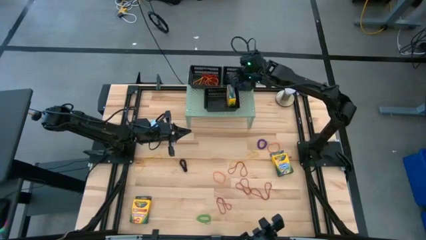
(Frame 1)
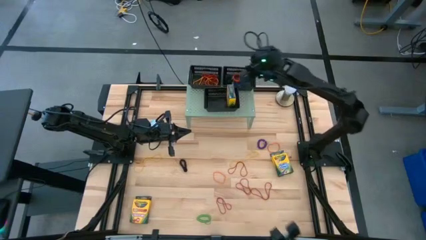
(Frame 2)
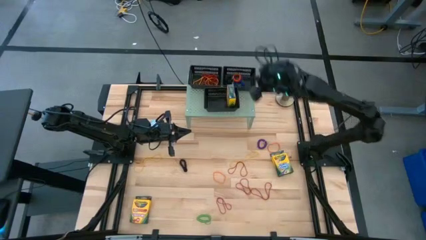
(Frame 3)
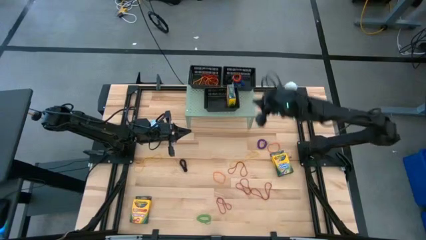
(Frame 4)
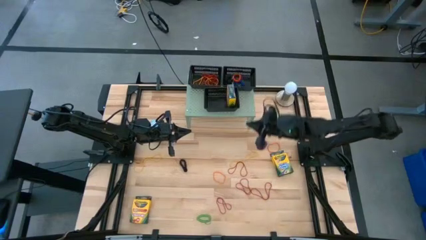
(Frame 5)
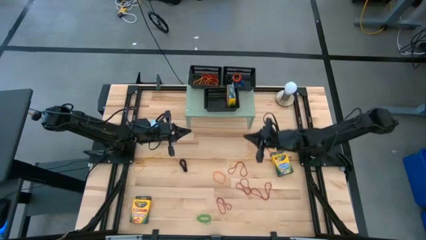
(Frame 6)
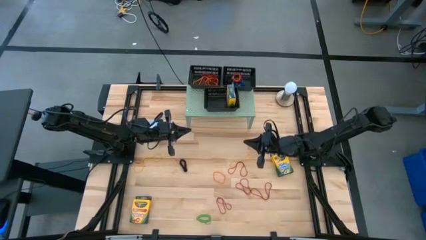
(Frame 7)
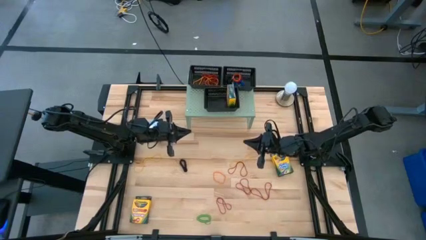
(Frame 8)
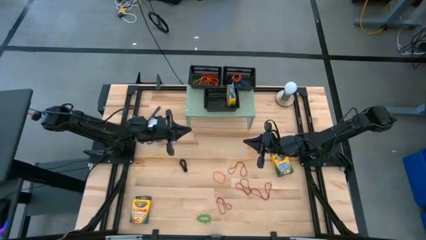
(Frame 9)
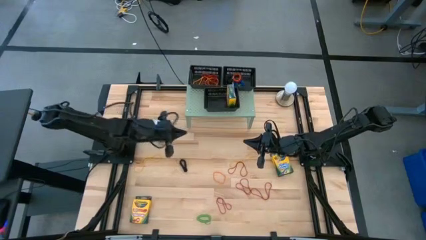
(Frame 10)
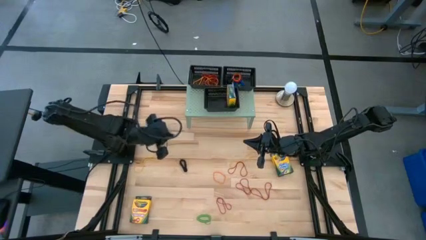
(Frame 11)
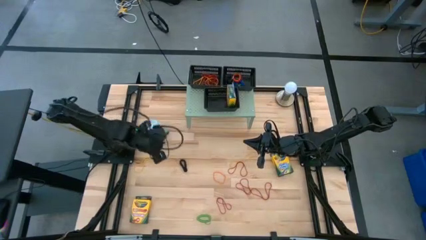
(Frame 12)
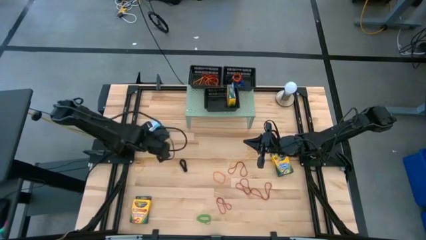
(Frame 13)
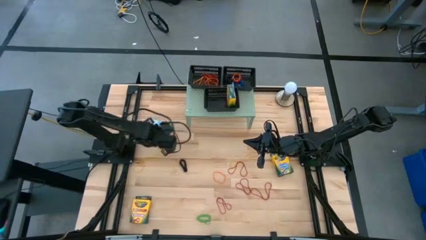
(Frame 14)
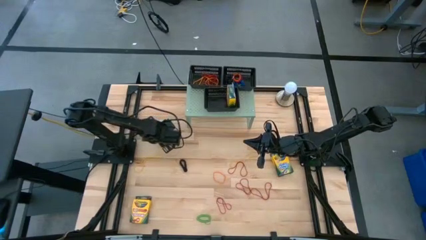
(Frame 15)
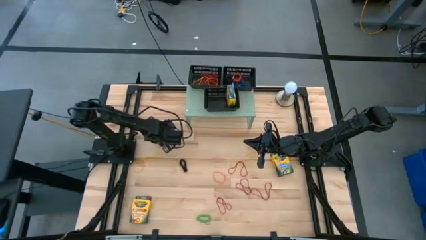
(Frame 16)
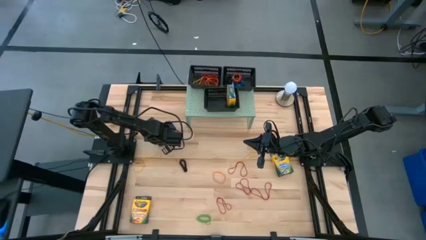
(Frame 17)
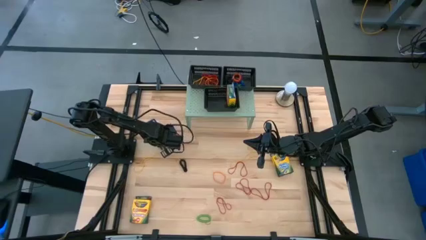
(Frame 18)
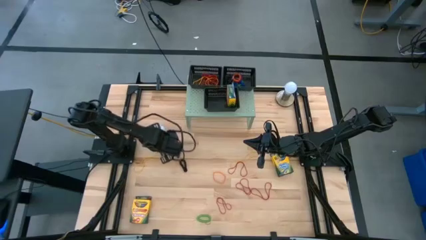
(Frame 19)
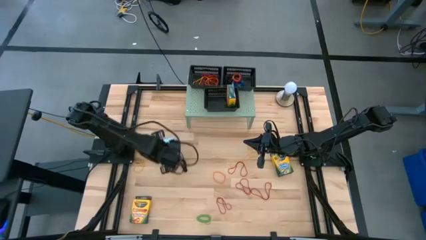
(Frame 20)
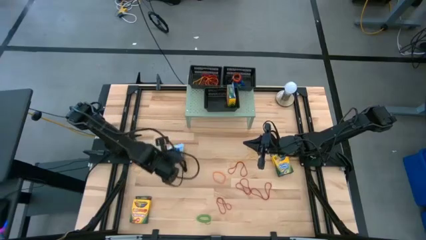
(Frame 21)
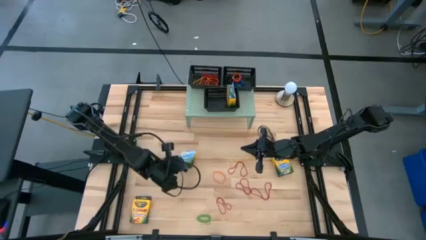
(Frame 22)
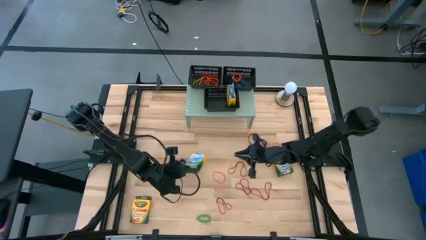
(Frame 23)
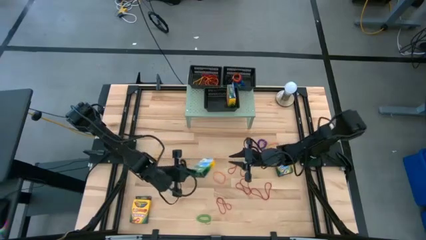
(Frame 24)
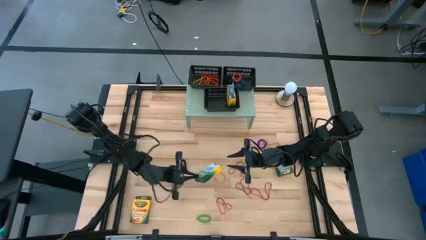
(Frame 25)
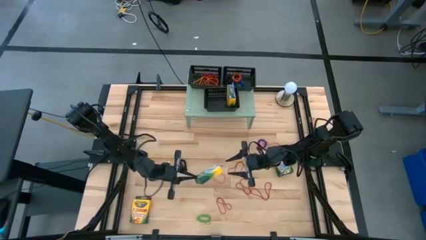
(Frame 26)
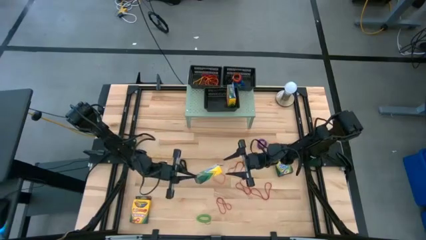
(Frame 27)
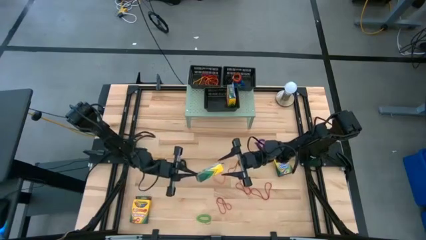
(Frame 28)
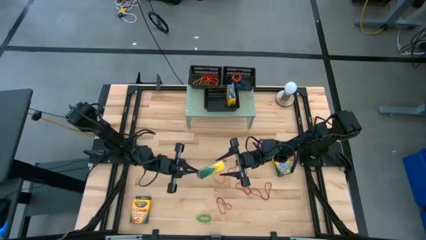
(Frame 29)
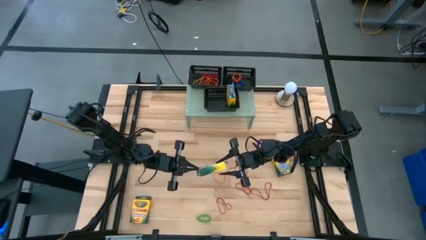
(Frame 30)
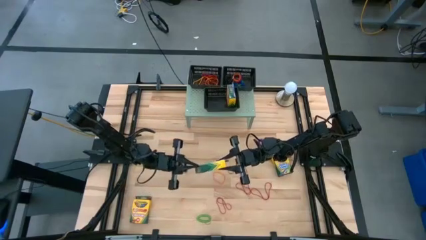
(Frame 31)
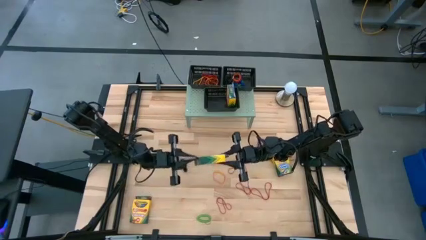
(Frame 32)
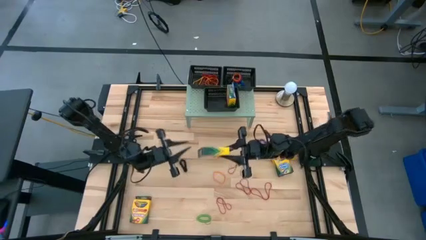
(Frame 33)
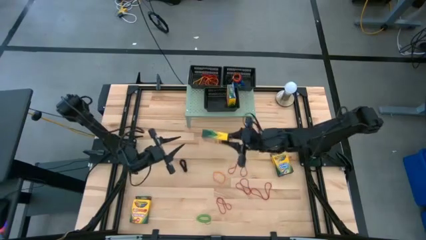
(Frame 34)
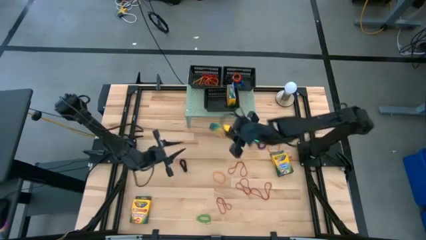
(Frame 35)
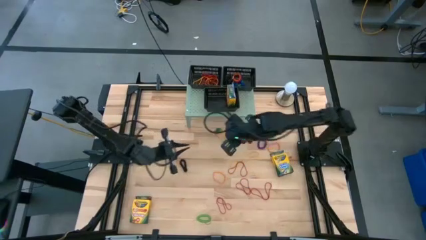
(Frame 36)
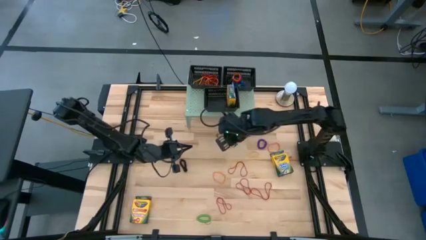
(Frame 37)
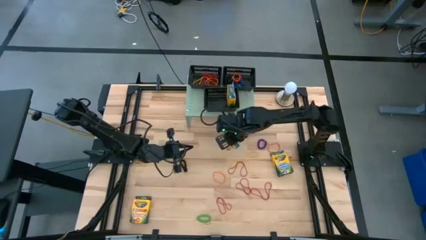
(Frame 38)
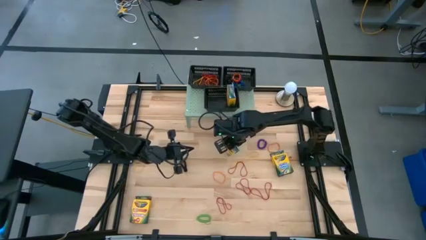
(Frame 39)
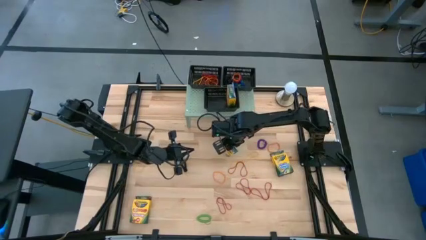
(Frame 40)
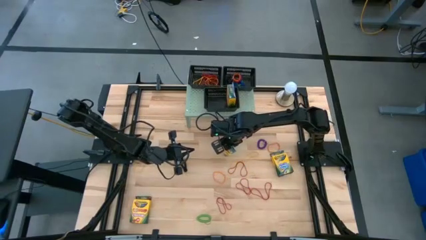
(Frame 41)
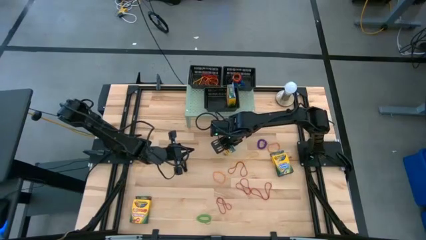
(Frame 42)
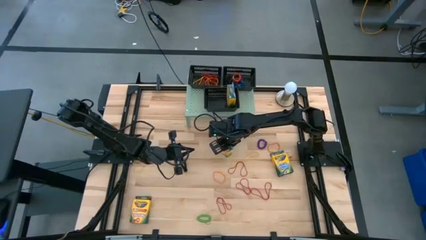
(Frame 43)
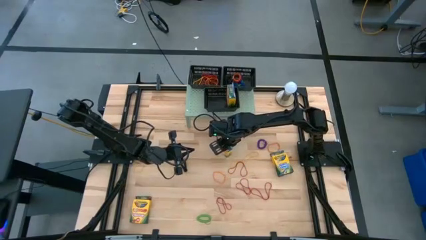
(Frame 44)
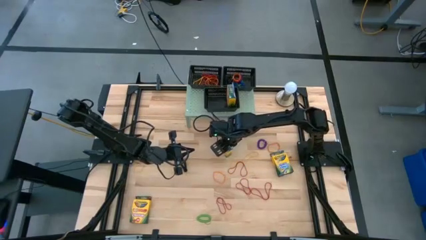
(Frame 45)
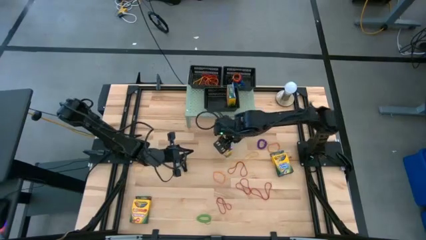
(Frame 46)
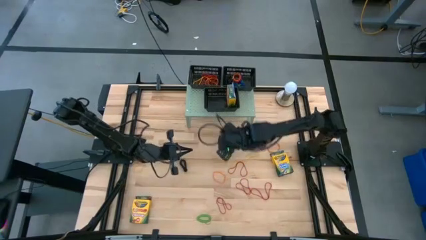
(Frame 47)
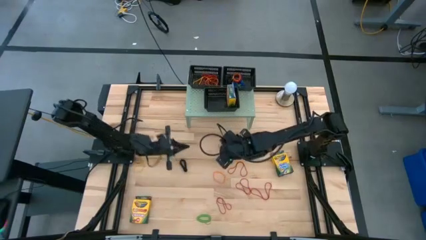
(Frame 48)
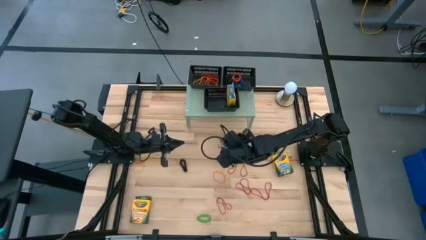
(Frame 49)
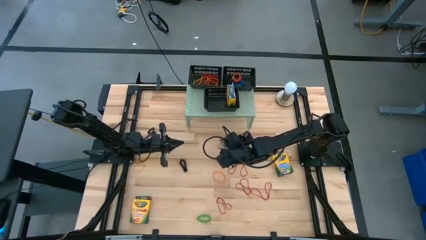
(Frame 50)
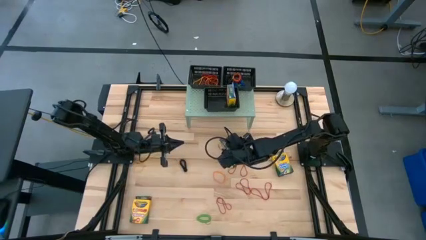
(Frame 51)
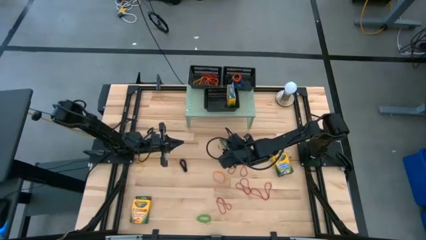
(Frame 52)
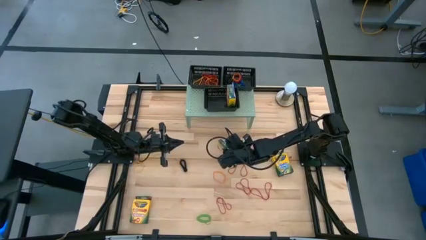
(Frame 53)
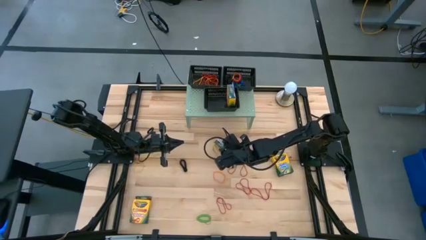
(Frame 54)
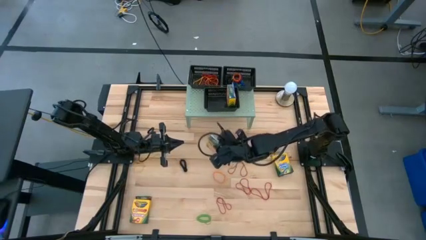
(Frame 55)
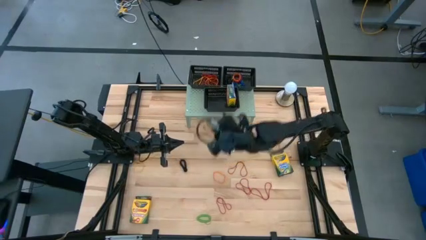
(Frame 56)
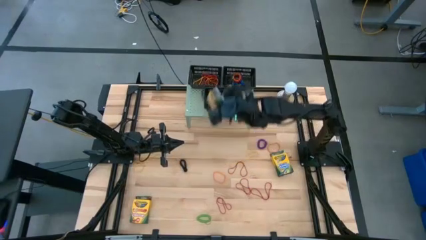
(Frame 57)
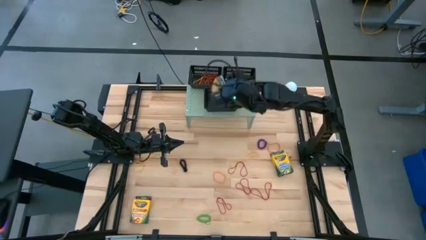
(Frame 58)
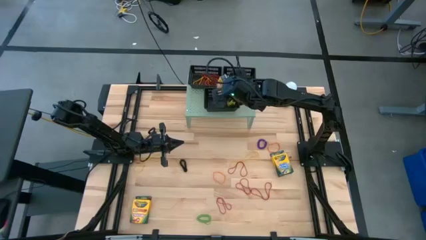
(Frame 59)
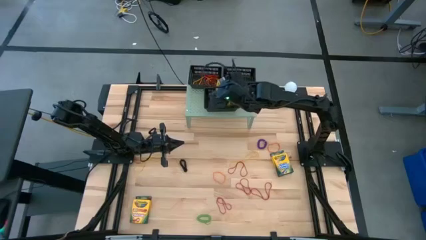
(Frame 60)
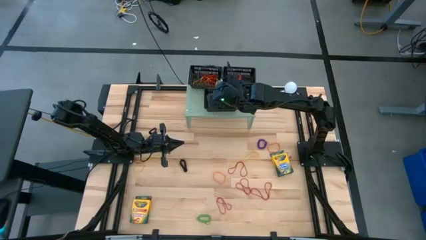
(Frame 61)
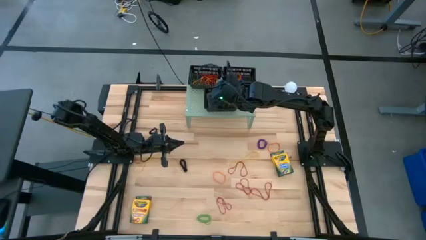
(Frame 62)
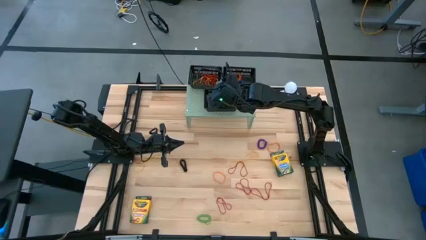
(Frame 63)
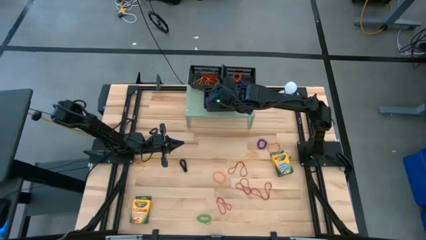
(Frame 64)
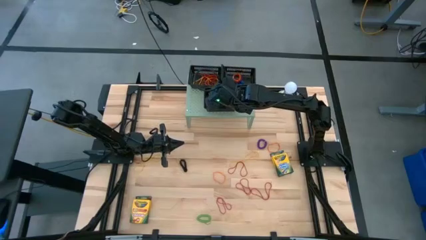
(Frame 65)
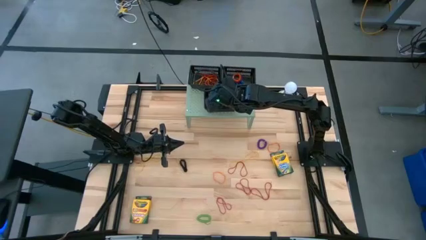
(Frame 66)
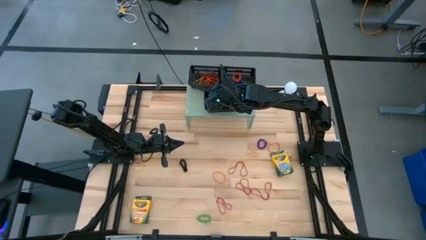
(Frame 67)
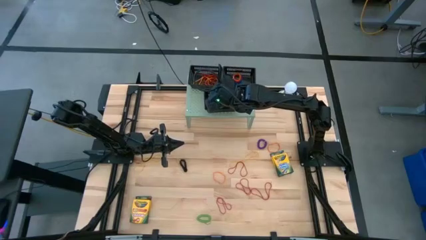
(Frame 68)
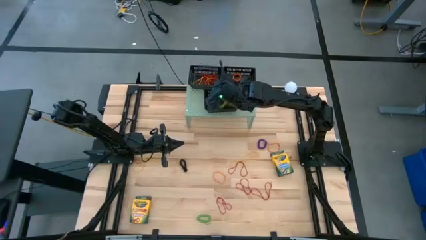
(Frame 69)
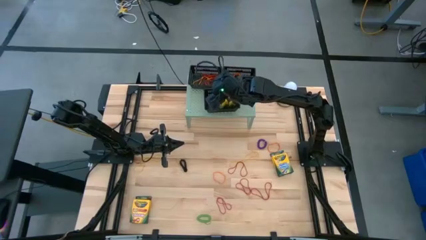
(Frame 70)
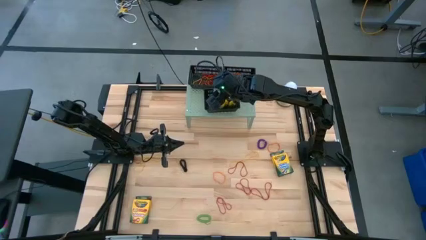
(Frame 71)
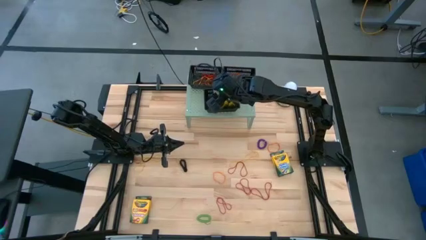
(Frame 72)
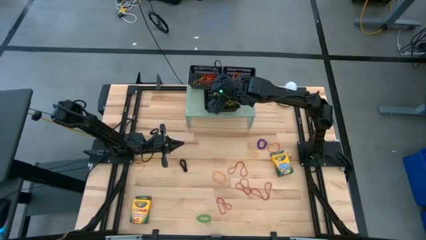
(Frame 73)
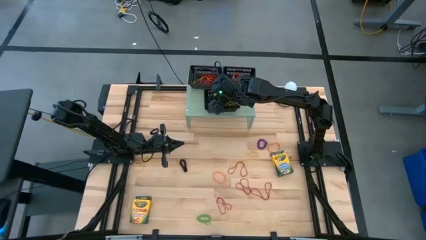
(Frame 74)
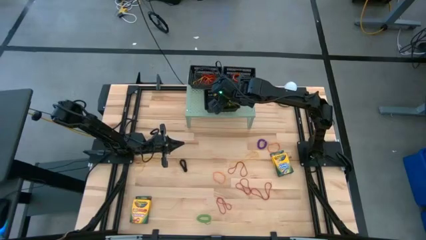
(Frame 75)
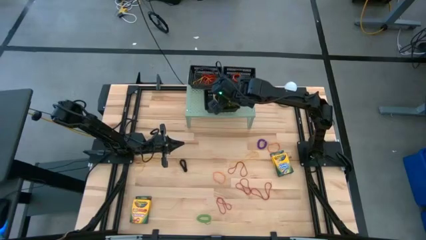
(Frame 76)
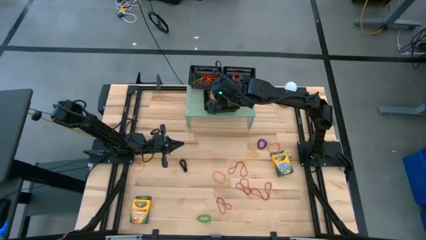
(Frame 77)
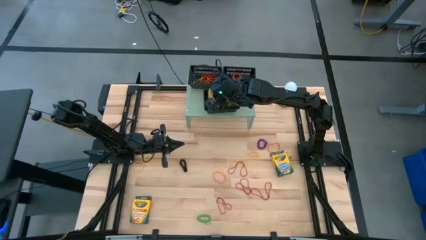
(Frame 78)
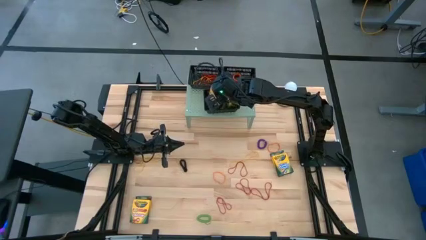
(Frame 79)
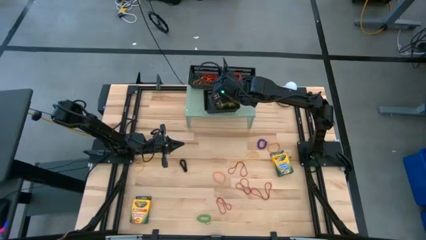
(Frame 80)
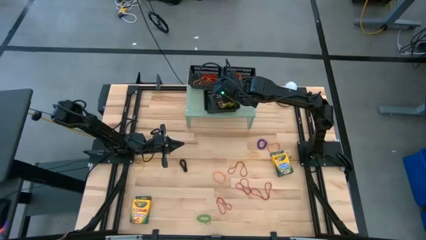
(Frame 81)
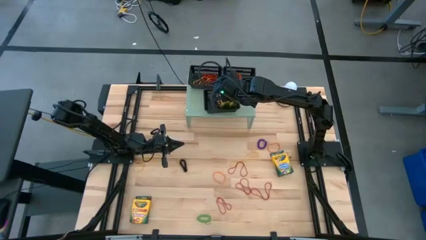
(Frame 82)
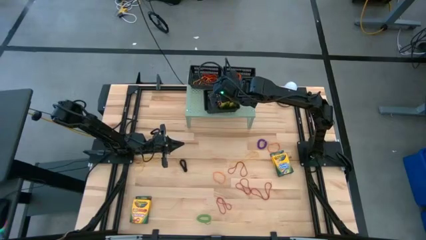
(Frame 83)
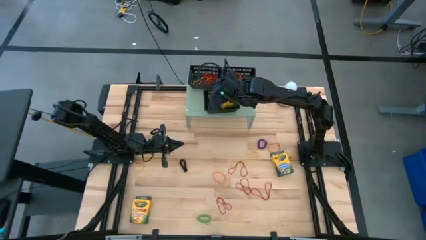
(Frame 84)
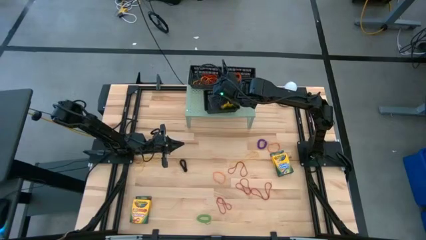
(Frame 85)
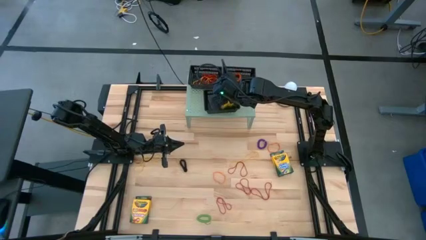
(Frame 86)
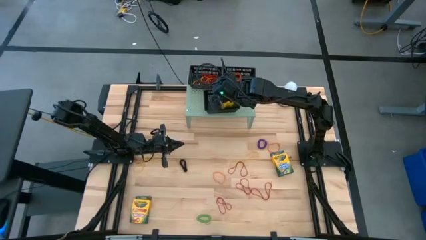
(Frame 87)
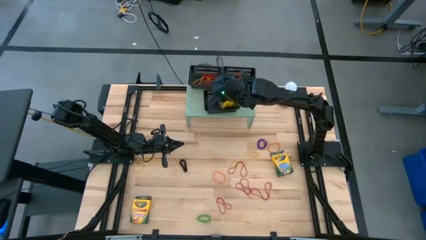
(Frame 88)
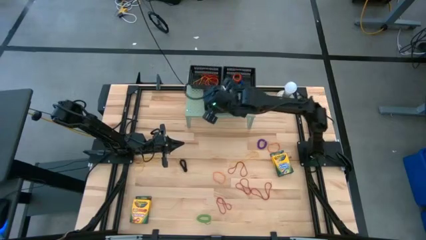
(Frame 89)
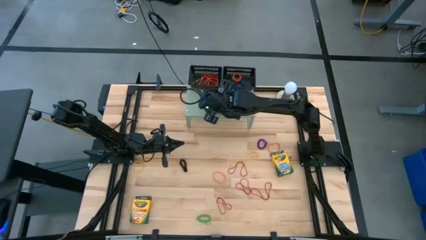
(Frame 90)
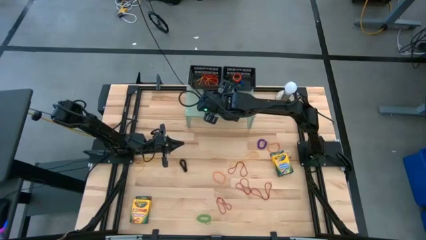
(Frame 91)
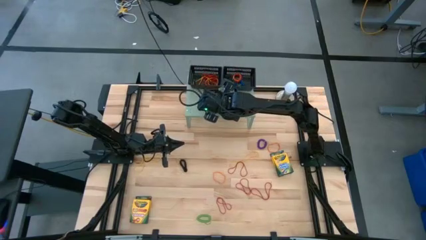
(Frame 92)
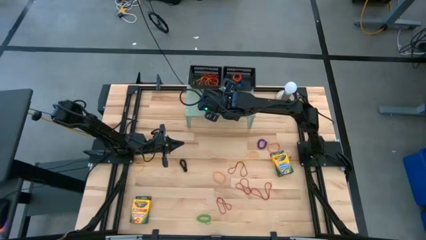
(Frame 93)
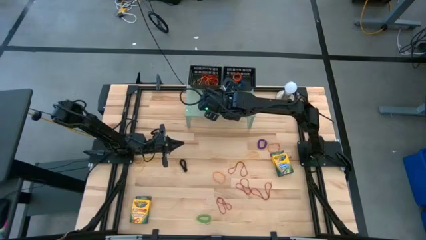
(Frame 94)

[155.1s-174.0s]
Task: Pick & Place Office Desk Supplies
Put the yellow crayon box into the bottom black bin
